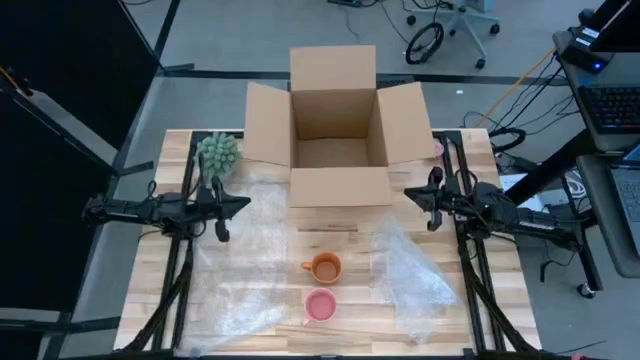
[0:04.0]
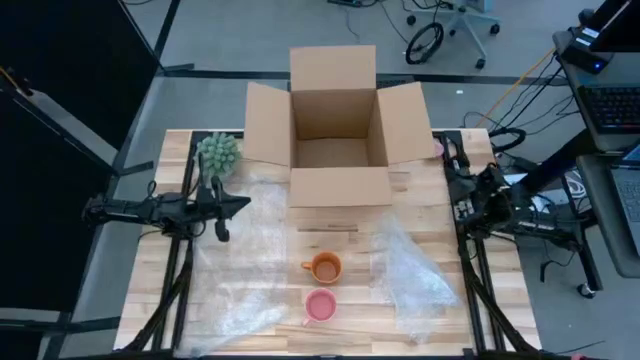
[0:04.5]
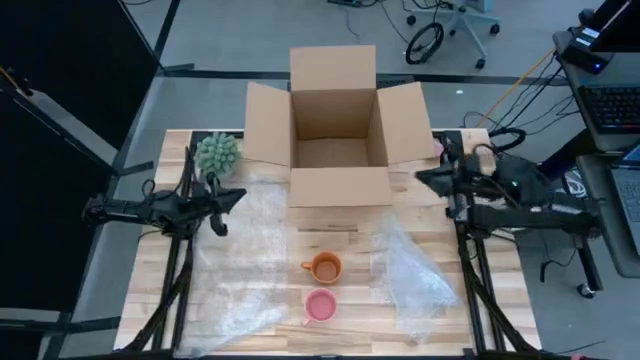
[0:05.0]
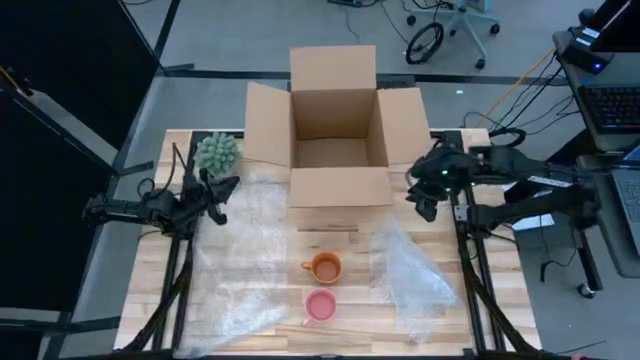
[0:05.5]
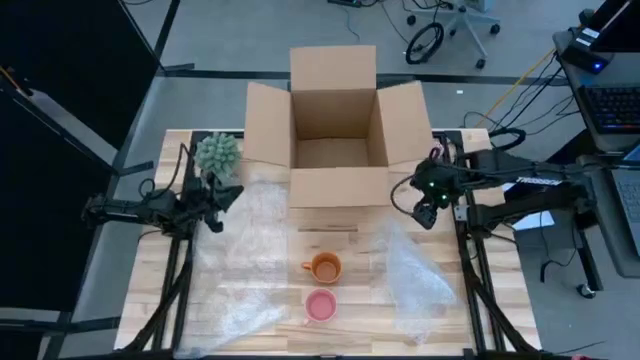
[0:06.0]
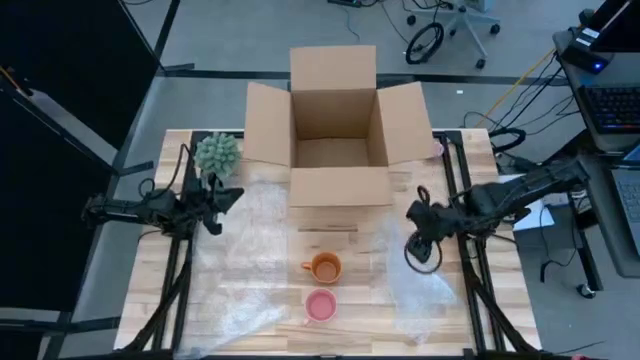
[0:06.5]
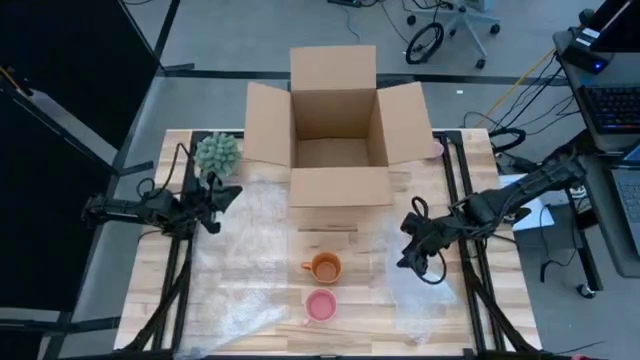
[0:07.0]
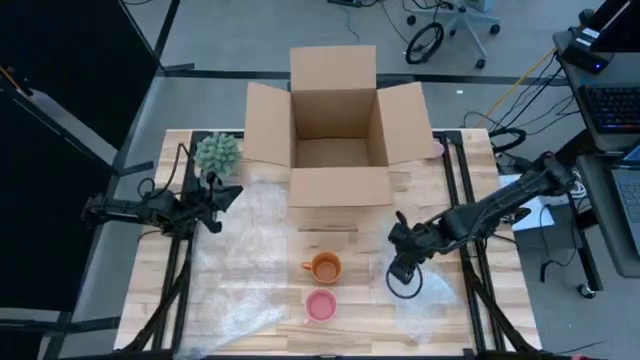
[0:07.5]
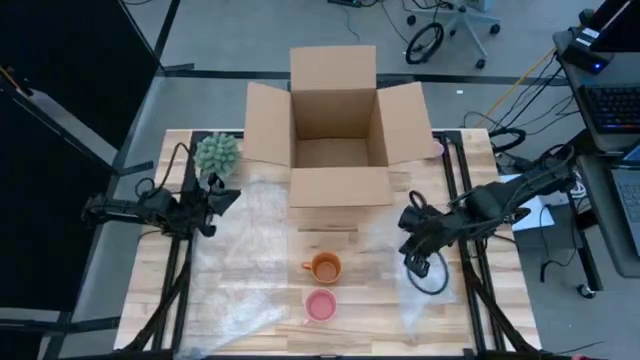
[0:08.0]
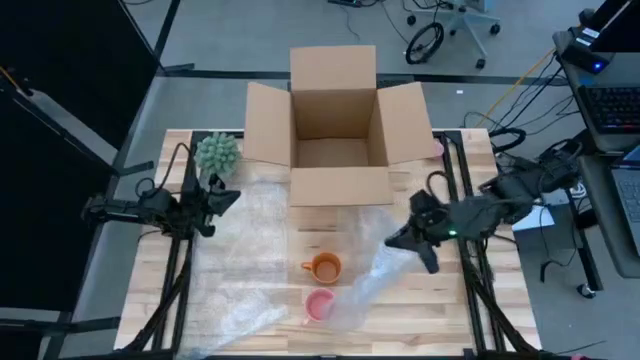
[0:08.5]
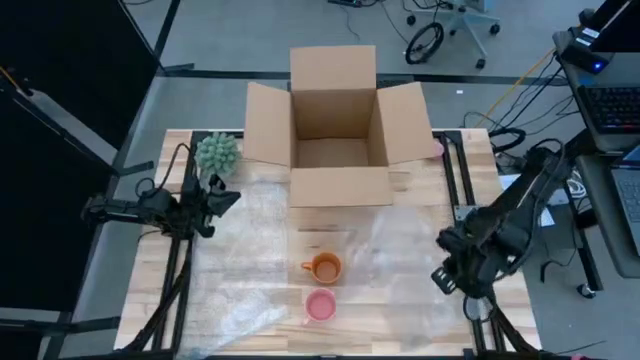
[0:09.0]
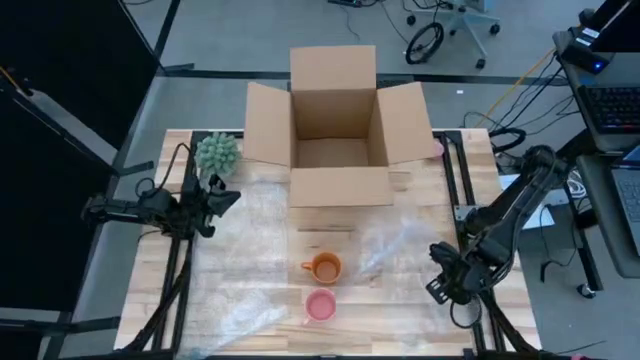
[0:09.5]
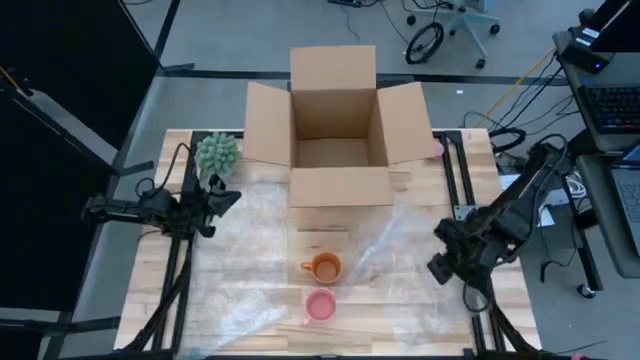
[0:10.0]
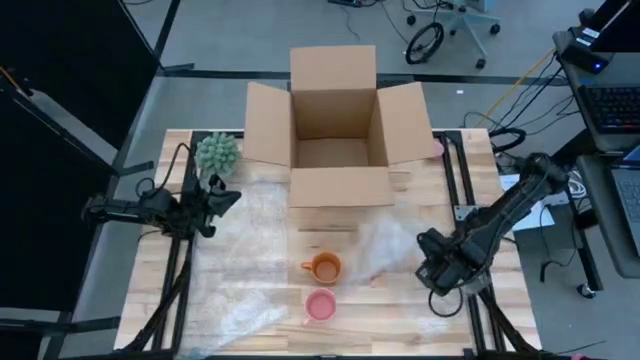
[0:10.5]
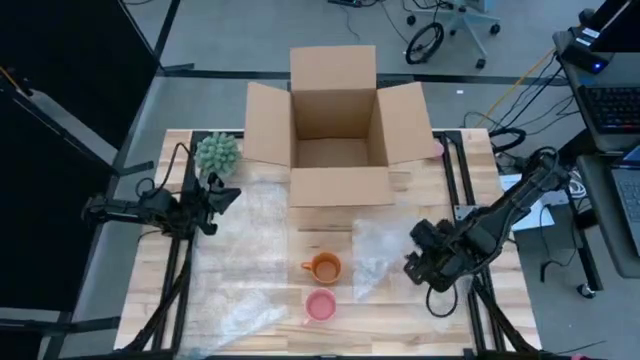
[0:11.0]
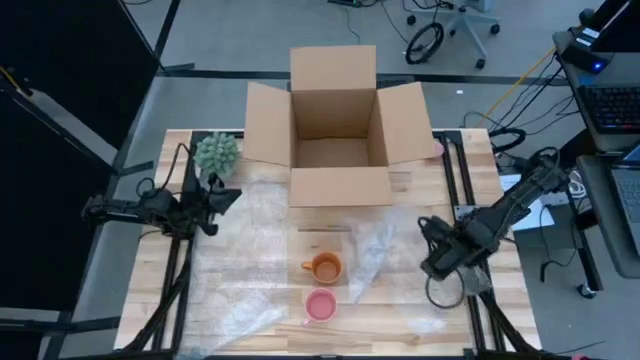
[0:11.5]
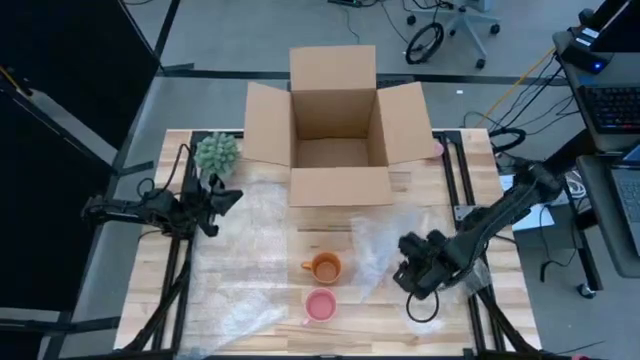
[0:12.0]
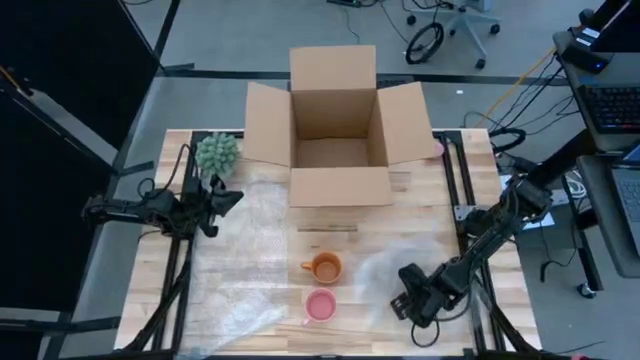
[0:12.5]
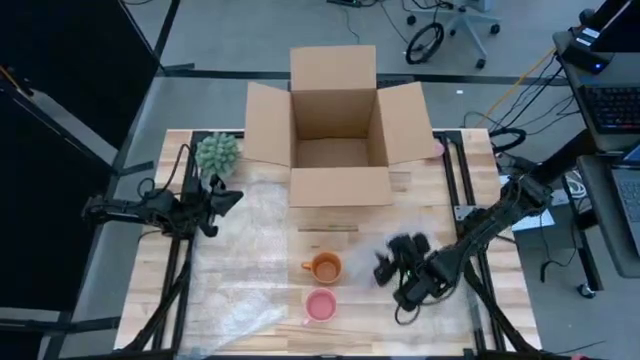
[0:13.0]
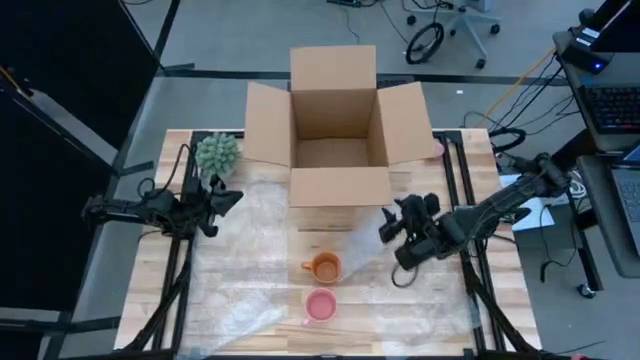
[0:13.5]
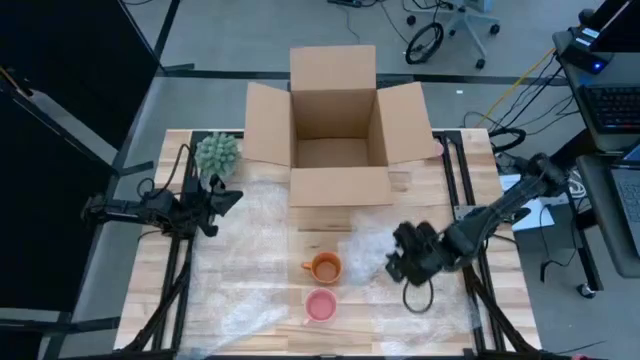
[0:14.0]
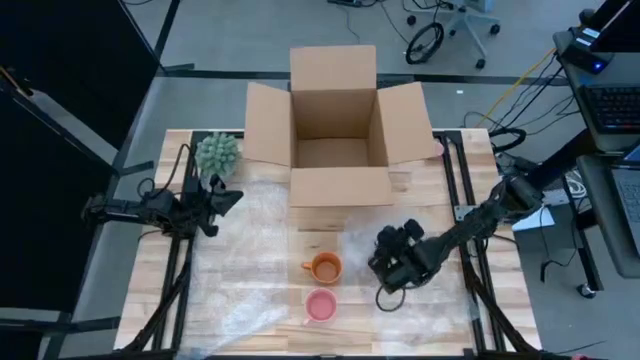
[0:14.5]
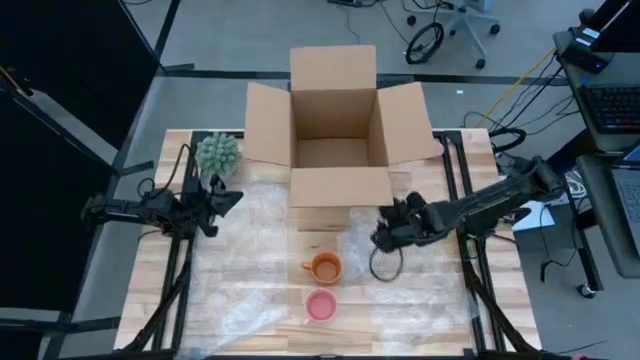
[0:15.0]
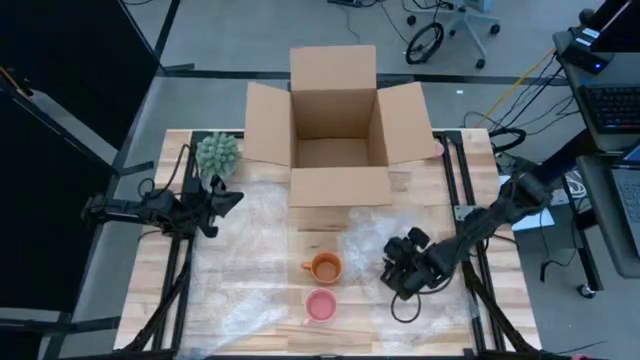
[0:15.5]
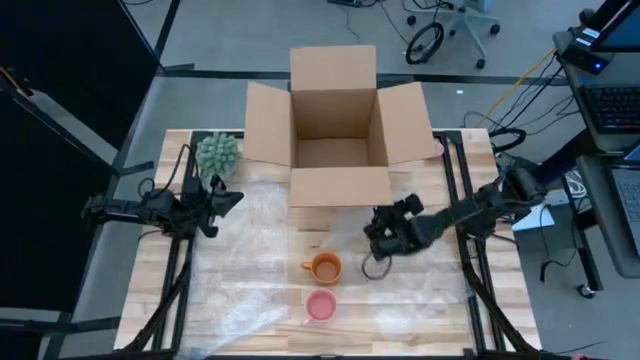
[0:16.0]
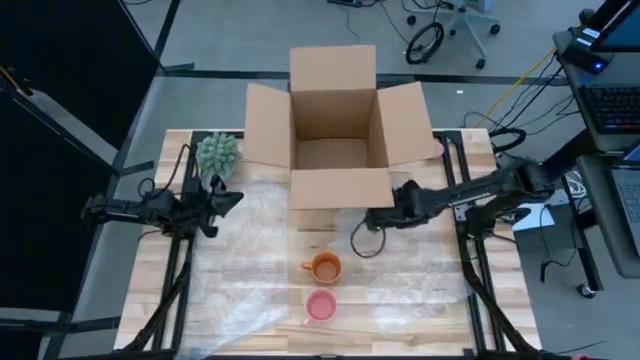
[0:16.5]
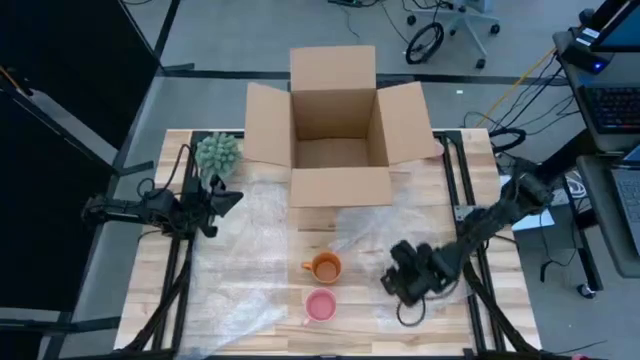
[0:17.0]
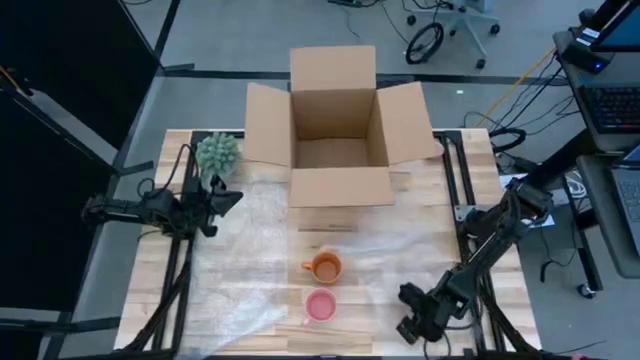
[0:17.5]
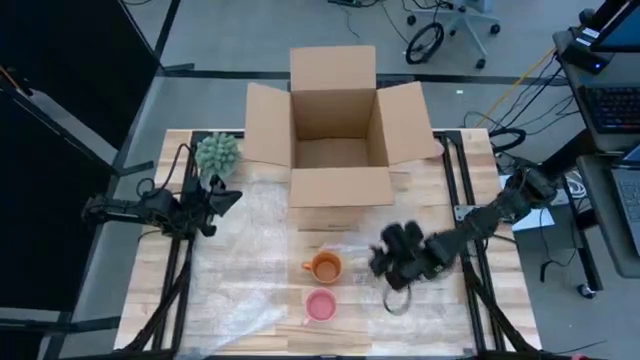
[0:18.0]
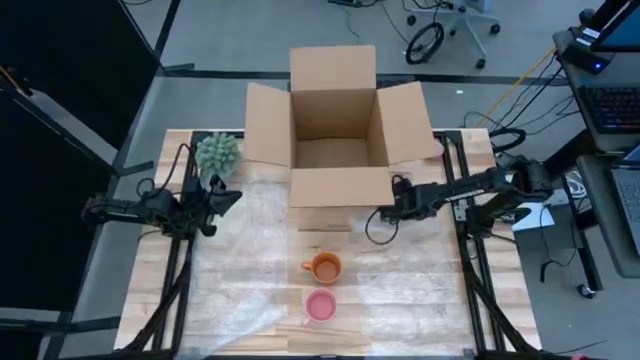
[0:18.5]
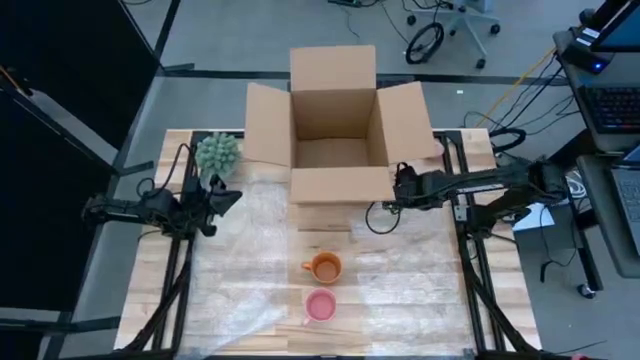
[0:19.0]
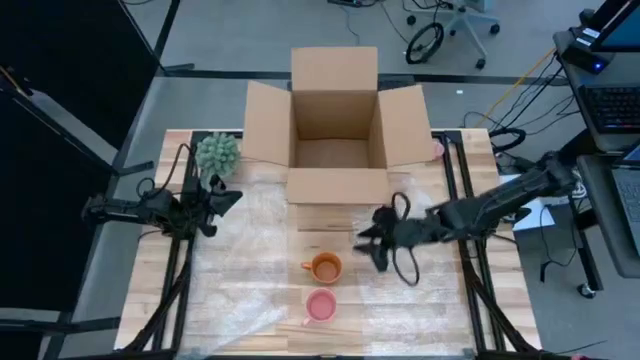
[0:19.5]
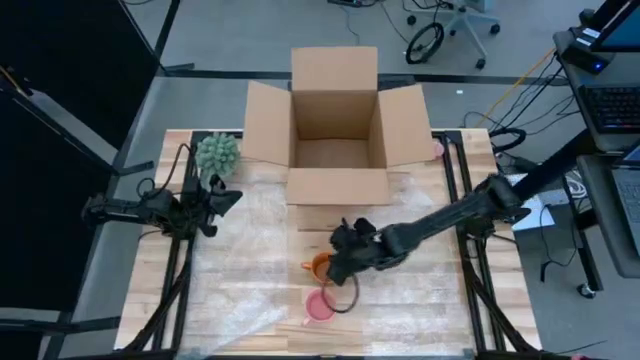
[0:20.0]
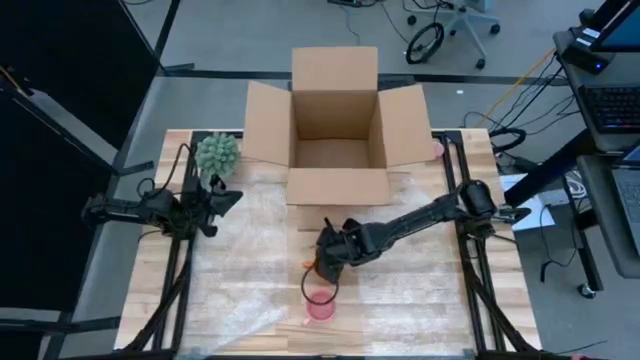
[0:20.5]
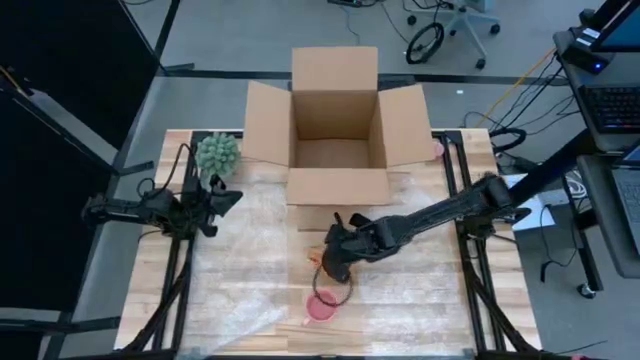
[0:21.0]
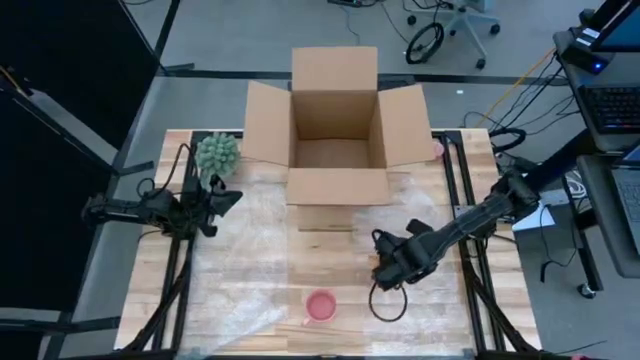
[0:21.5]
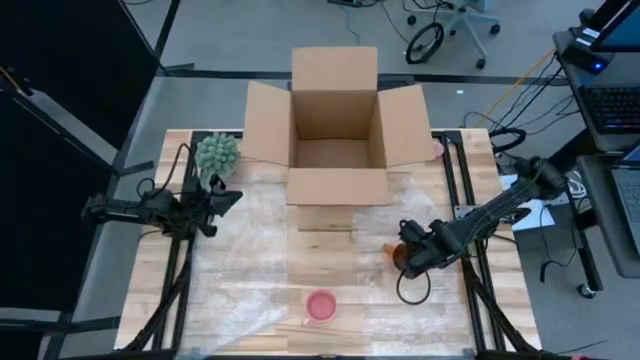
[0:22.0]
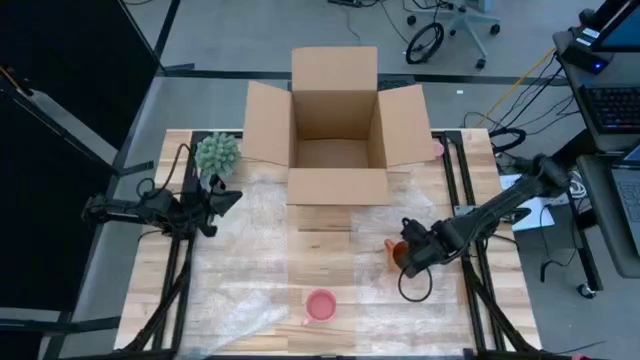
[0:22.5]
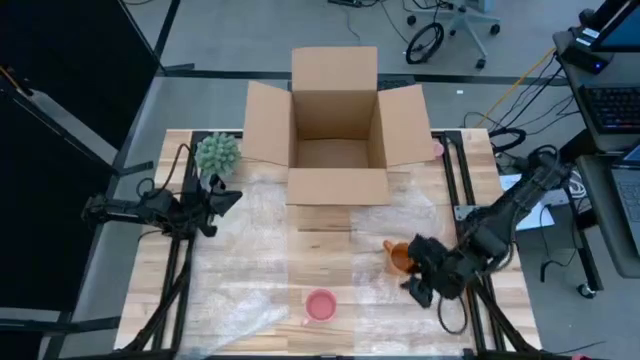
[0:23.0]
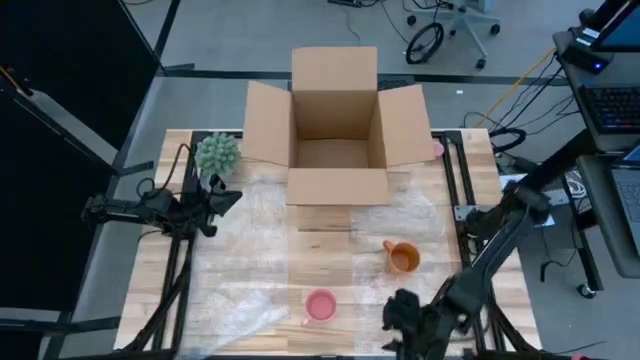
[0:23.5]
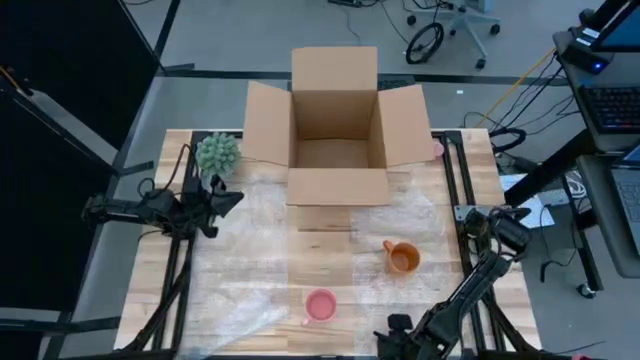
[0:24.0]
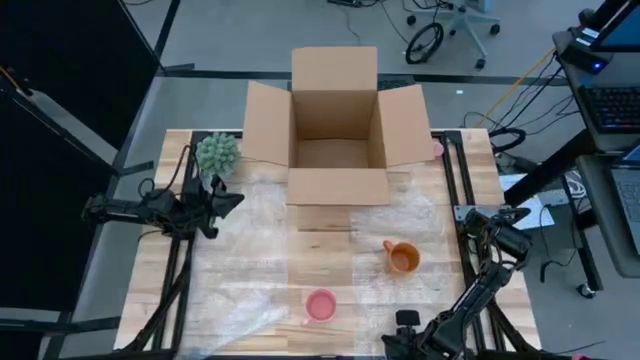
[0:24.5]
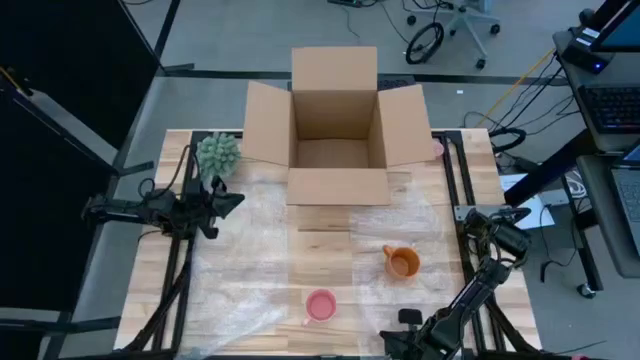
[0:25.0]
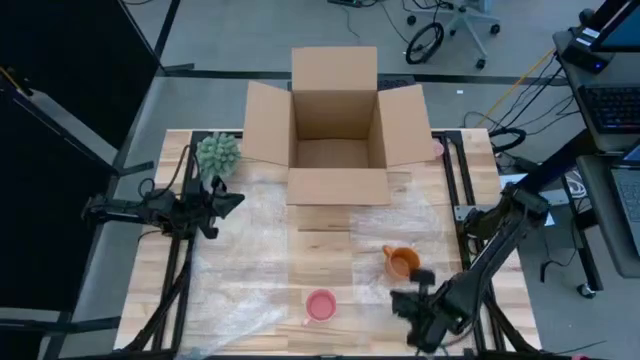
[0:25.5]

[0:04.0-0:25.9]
Task: wrap mug
Wrap the yellow mug with bubble wrap
